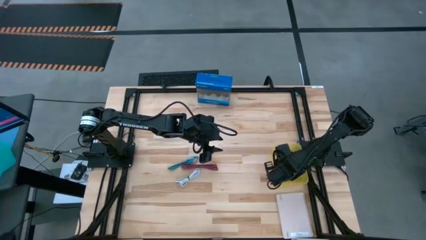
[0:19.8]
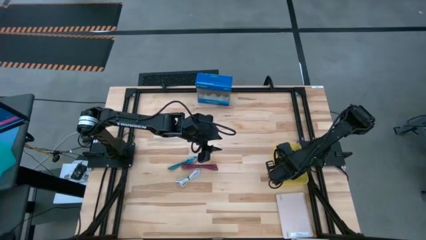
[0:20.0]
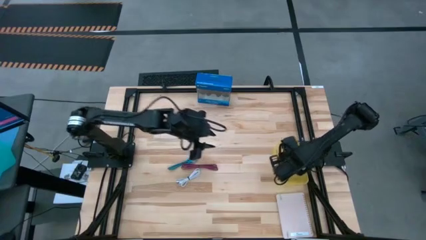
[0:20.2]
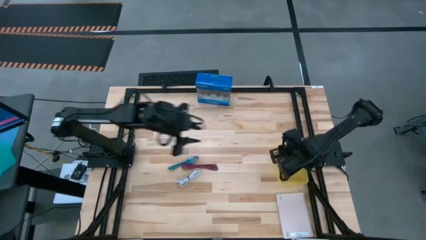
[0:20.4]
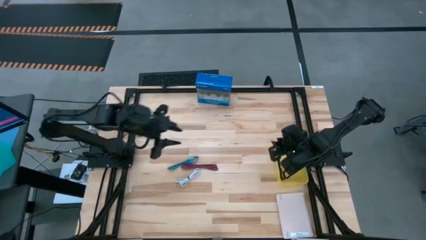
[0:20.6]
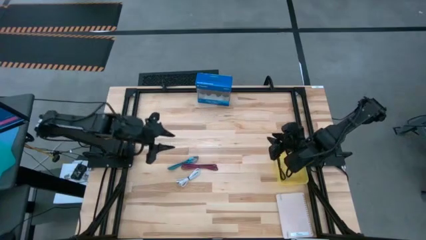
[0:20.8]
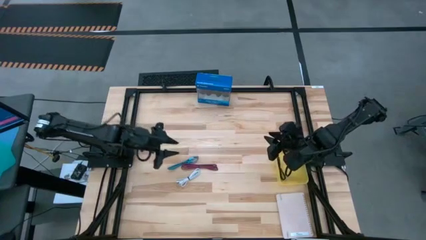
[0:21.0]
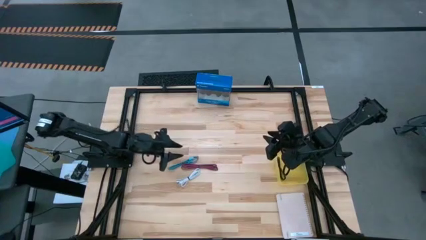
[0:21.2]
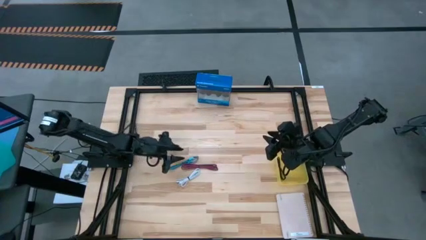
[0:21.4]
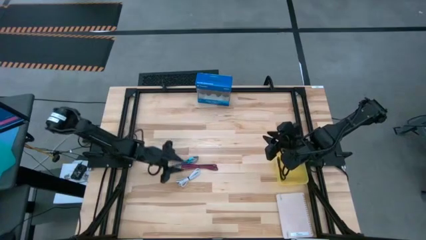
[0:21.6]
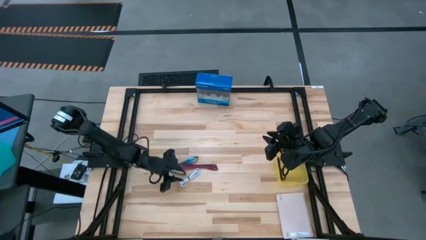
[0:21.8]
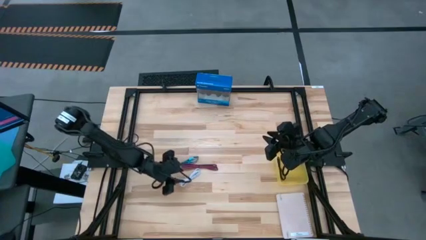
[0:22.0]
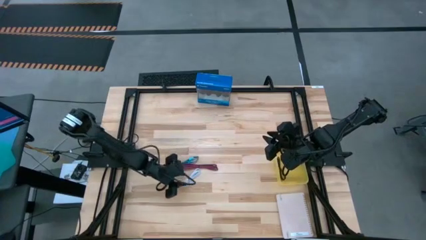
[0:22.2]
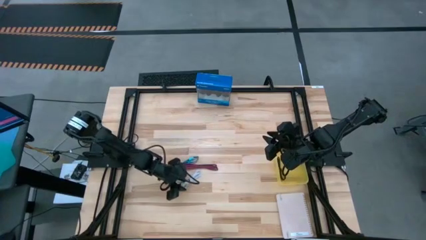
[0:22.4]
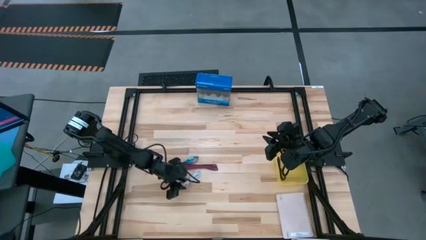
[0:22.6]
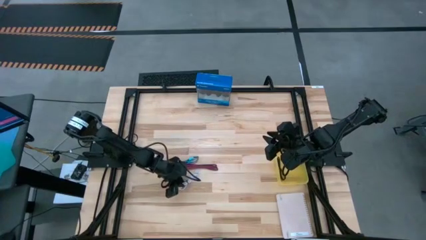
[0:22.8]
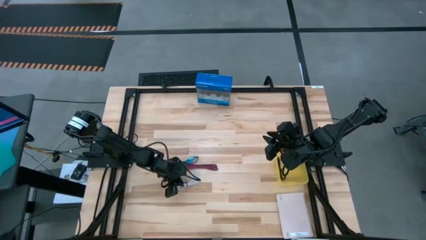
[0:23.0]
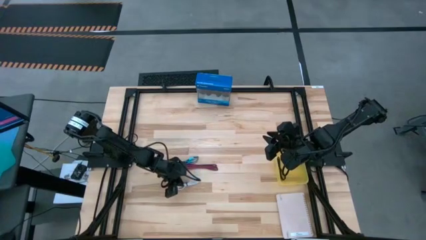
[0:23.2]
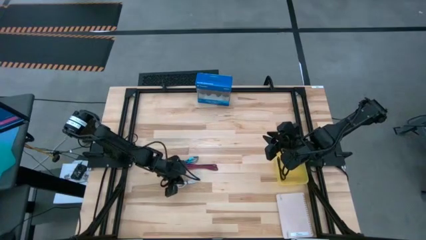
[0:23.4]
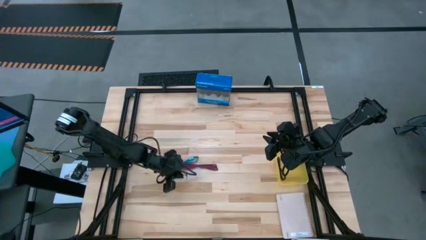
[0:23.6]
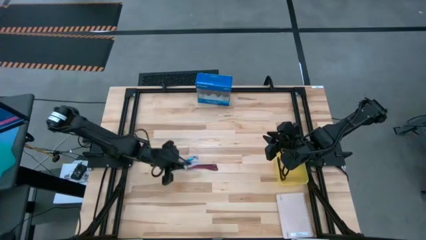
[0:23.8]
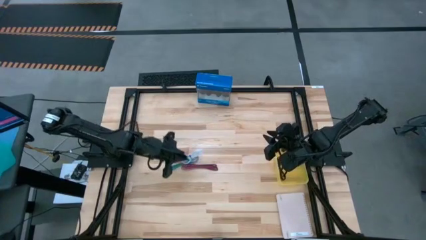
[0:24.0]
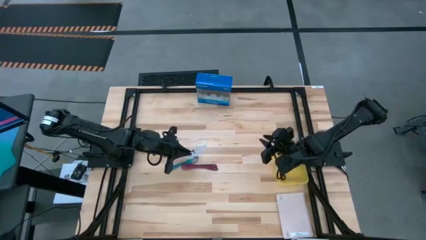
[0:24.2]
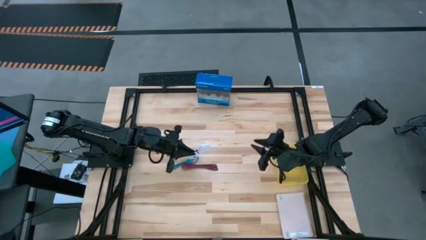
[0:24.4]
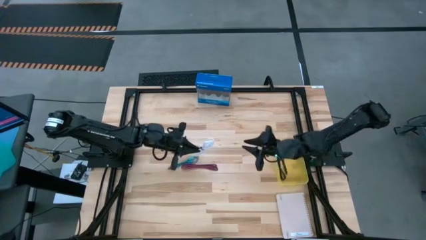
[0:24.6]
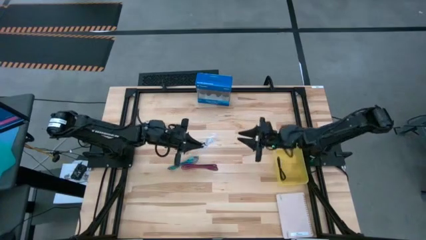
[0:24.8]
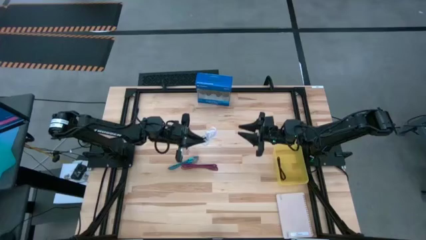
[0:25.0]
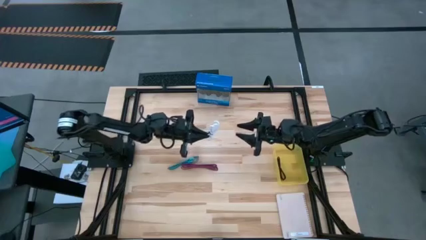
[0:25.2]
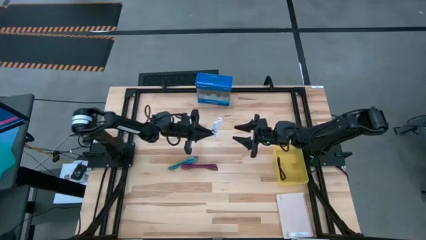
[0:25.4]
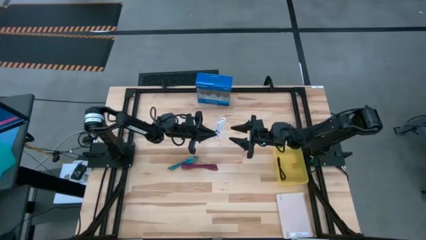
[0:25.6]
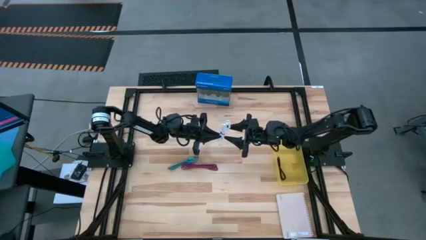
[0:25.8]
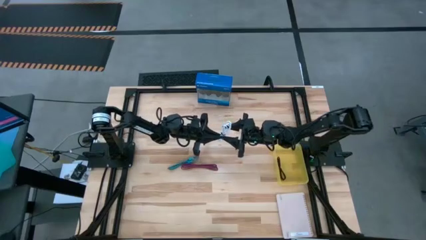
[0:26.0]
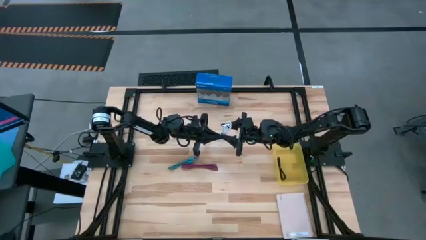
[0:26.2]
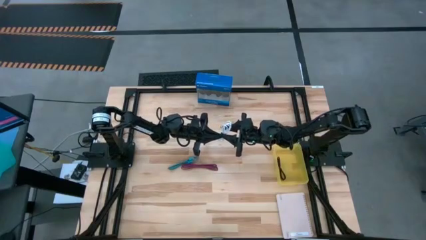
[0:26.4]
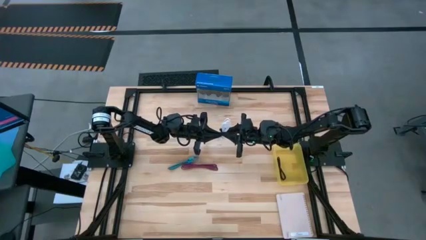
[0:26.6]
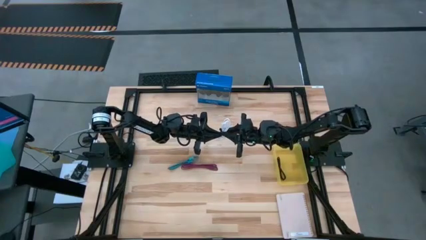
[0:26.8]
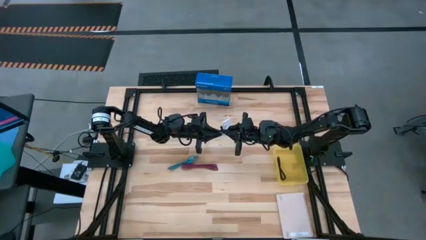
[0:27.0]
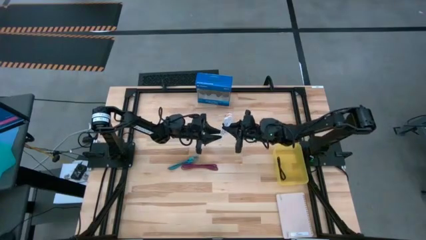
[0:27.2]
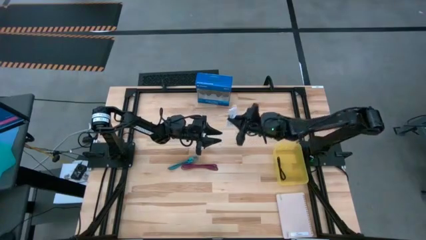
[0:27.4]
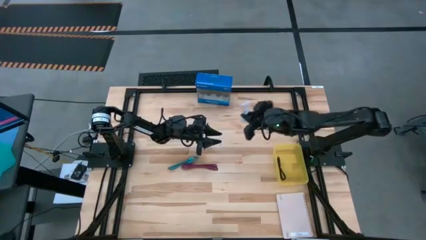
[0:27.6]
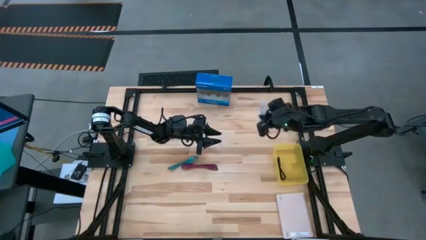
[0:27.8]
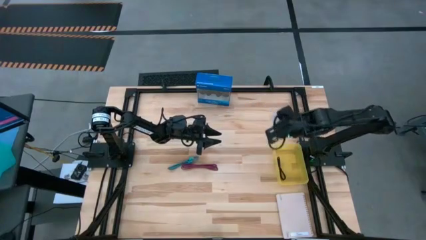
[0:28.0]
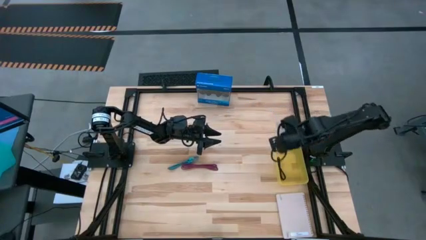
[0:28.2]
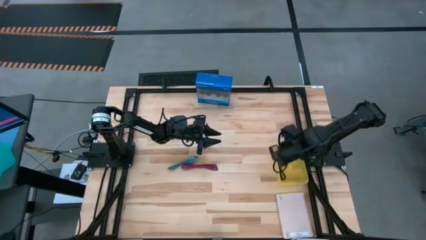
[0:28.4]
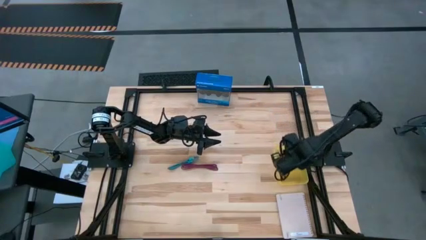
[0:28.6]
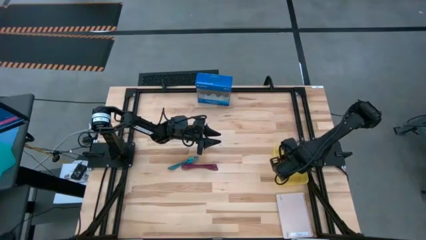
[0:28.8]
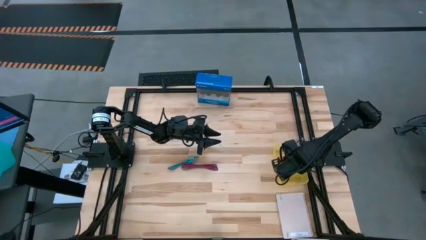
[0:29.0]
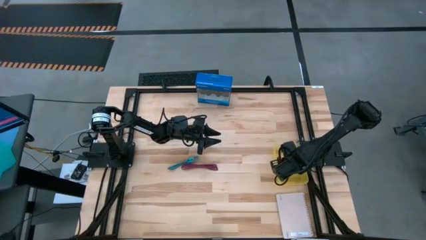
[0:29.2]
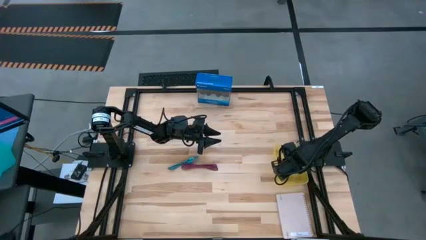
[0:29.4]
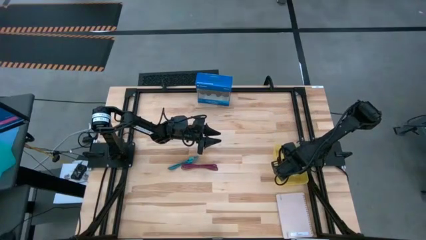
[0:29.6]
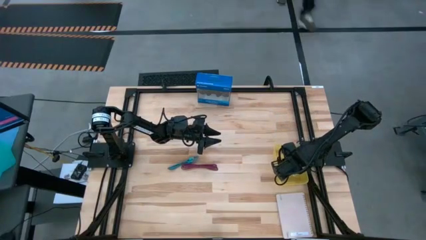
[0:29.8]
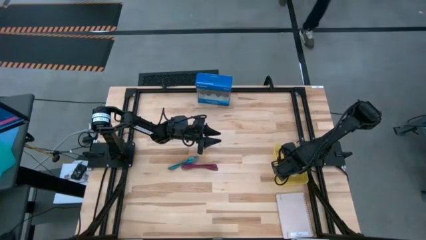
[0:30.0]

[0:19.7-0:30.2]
Task: Pick and place USB-C Cables
Put the white charger cable into the yellow bin
